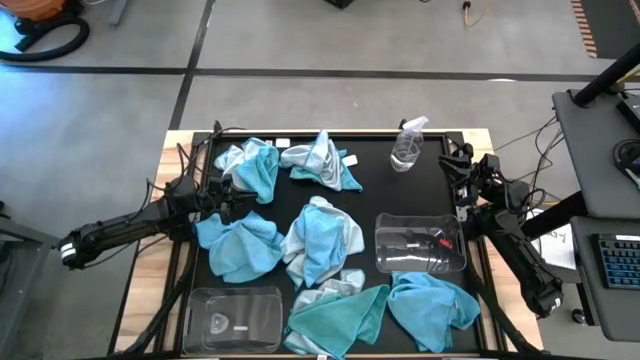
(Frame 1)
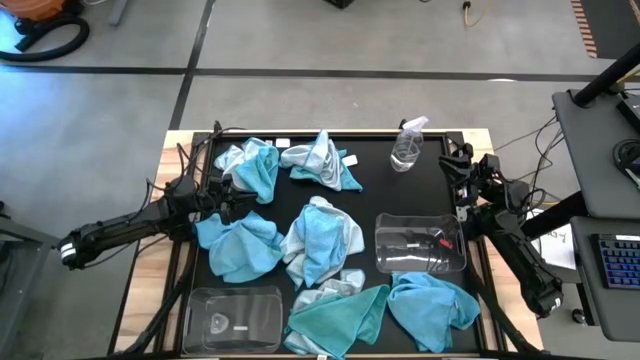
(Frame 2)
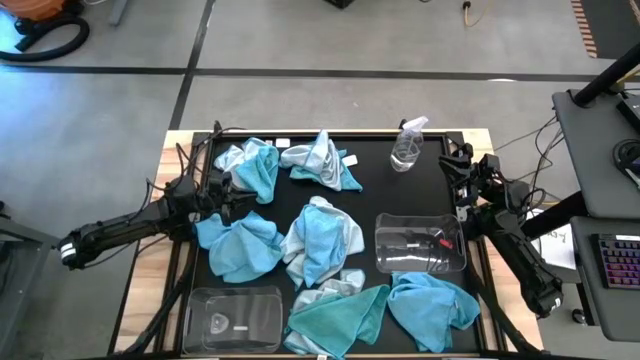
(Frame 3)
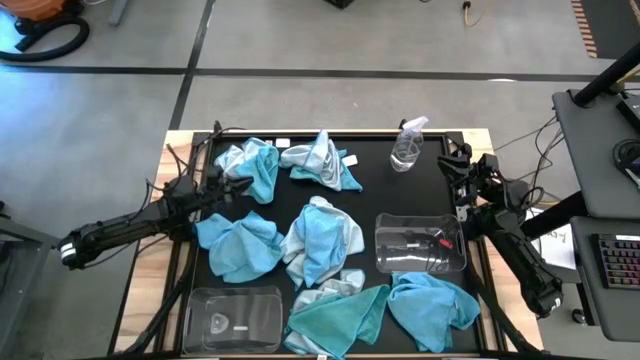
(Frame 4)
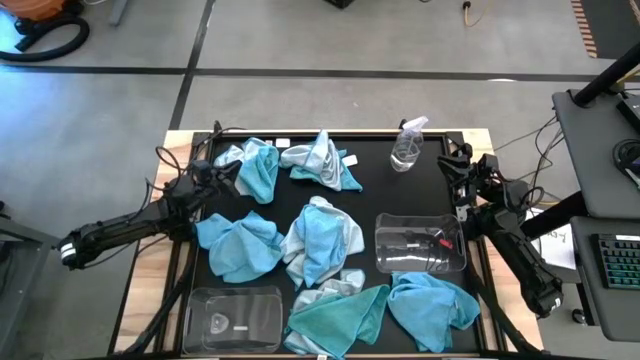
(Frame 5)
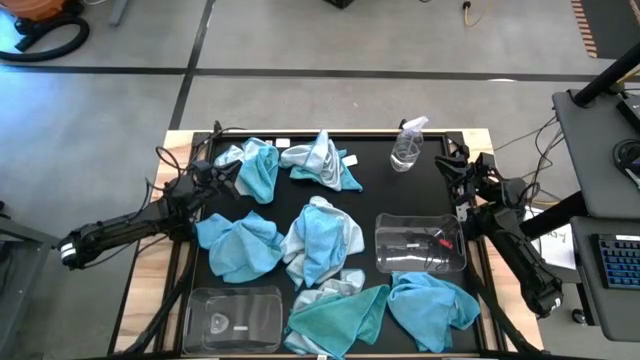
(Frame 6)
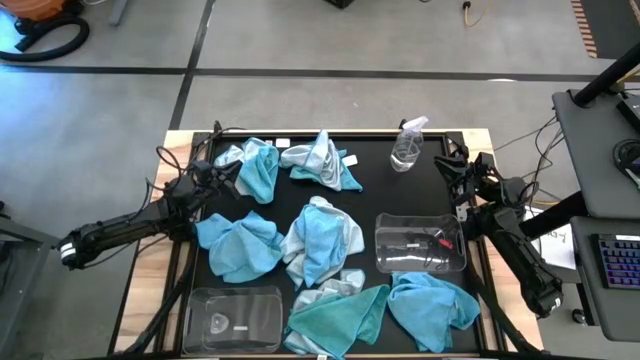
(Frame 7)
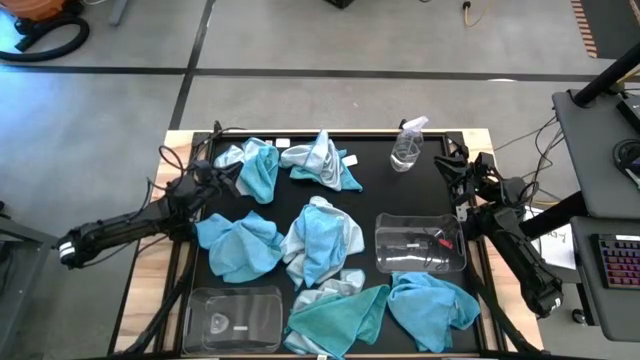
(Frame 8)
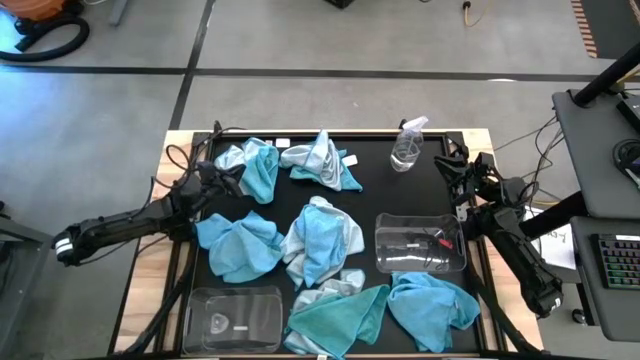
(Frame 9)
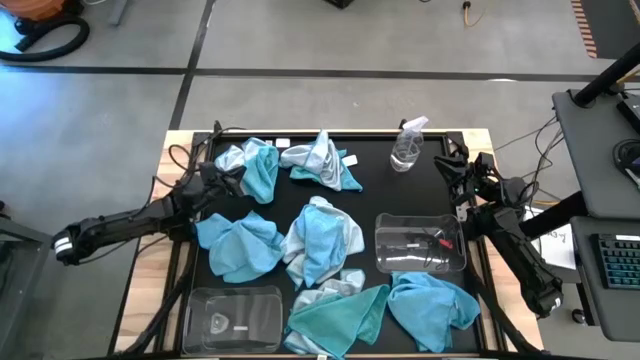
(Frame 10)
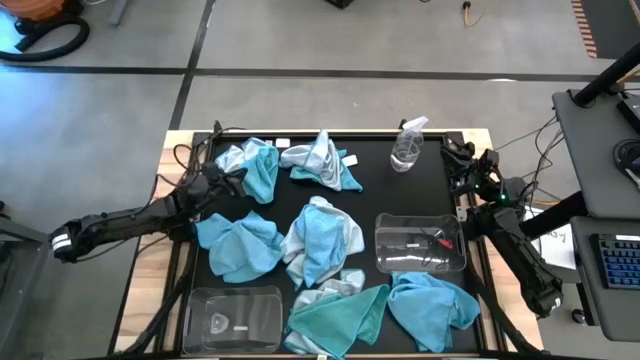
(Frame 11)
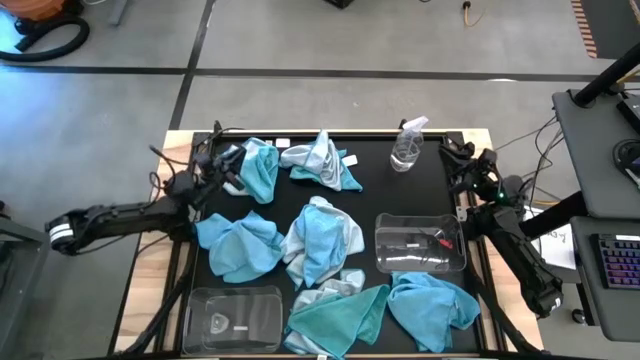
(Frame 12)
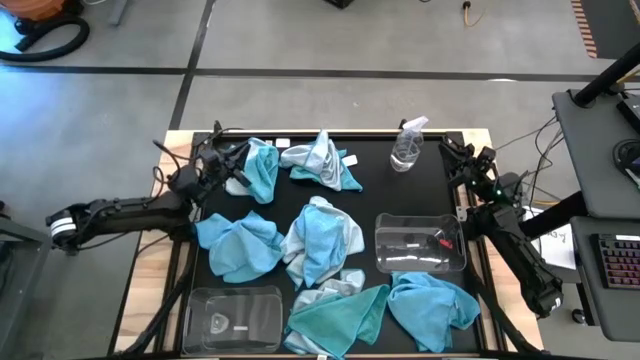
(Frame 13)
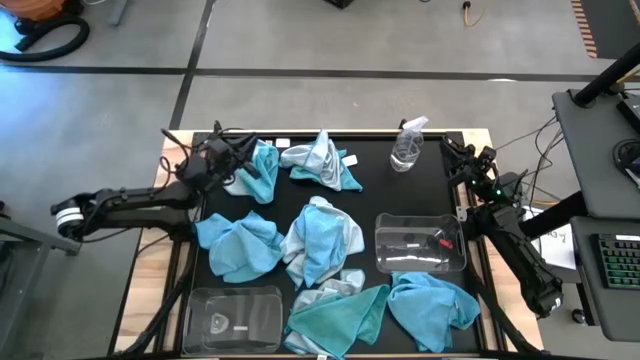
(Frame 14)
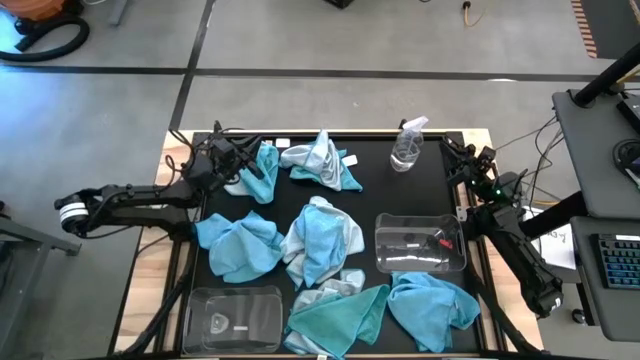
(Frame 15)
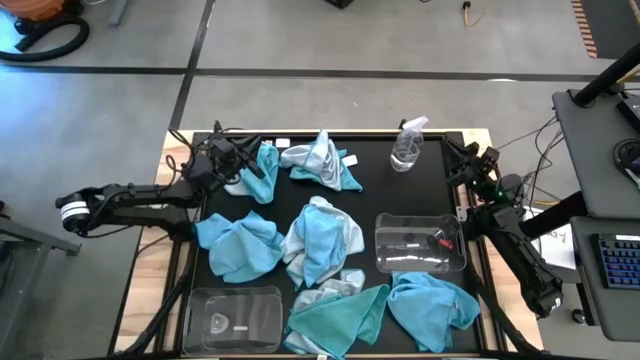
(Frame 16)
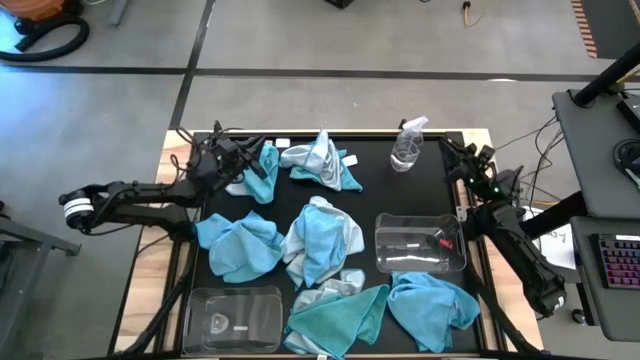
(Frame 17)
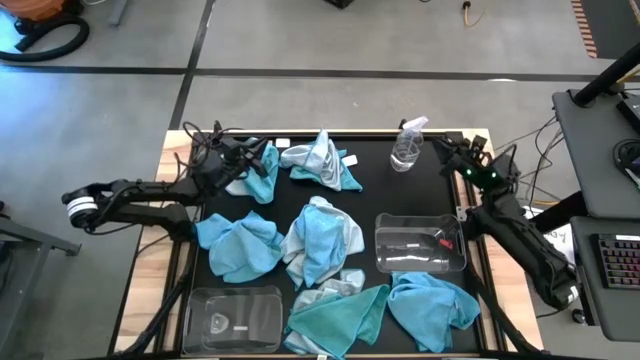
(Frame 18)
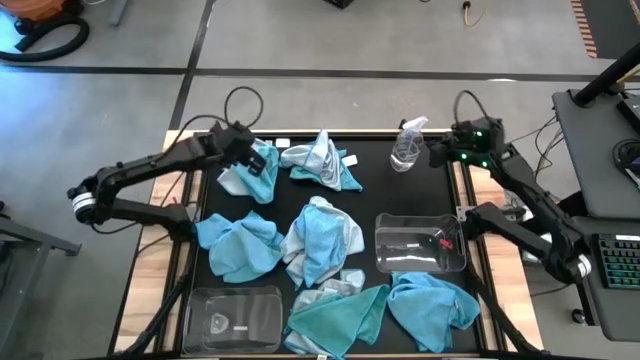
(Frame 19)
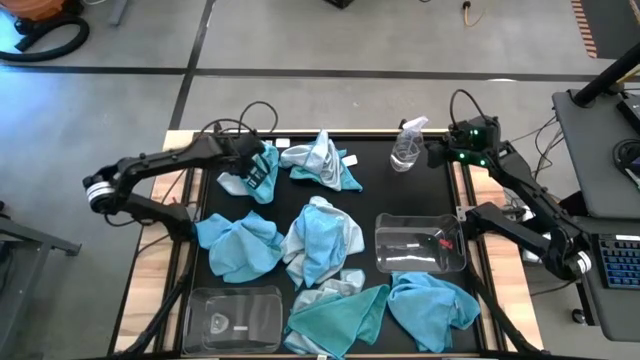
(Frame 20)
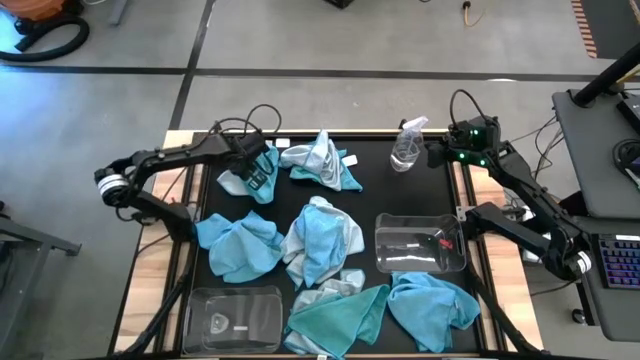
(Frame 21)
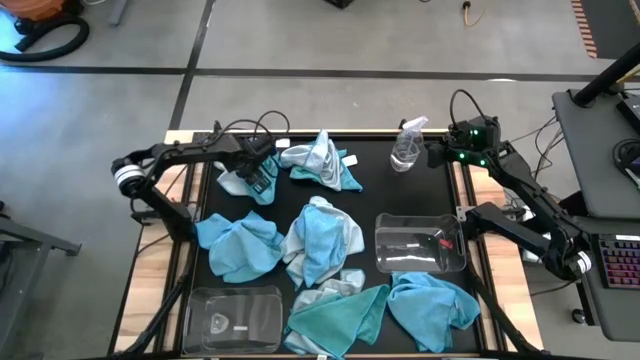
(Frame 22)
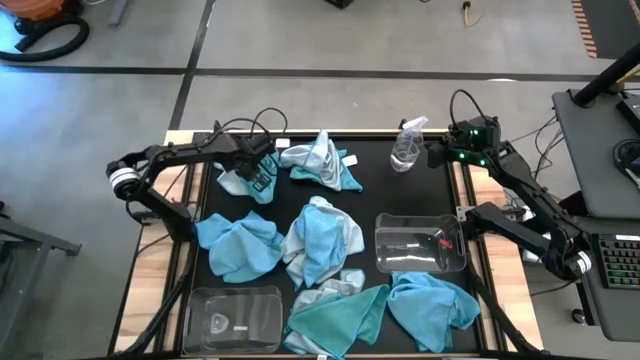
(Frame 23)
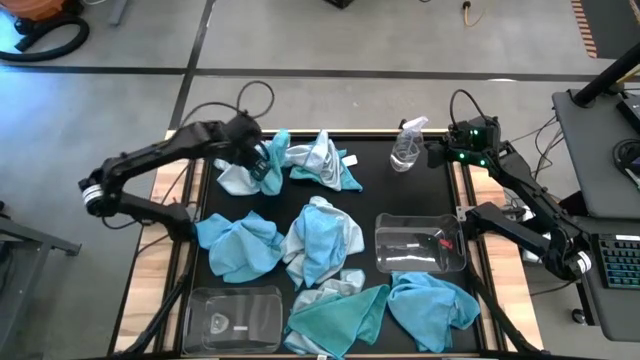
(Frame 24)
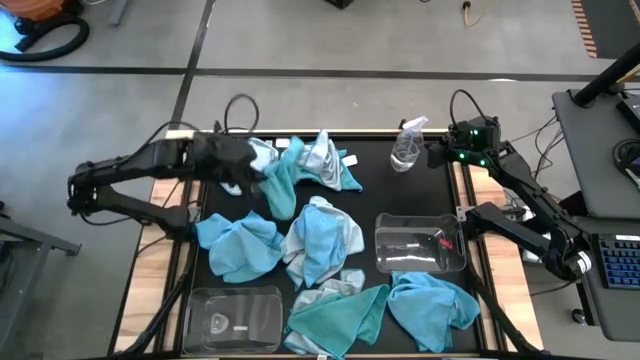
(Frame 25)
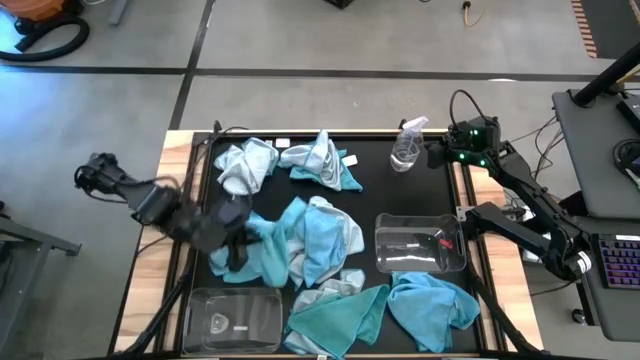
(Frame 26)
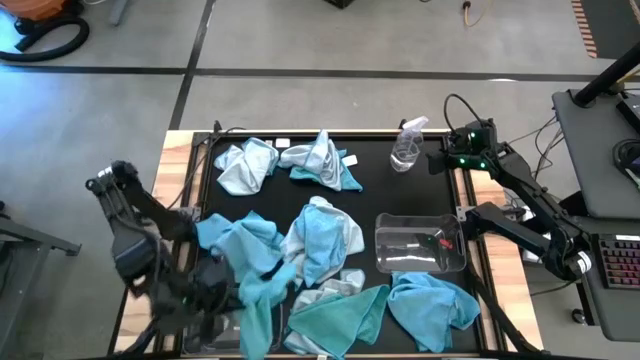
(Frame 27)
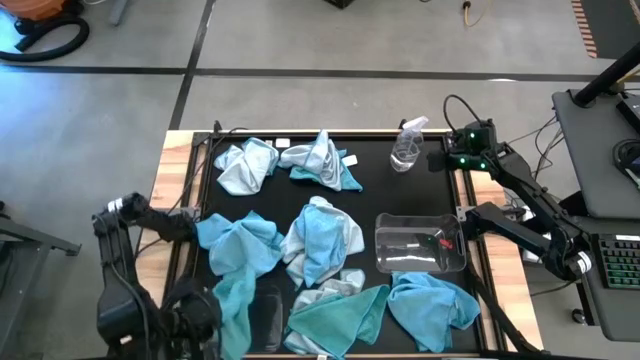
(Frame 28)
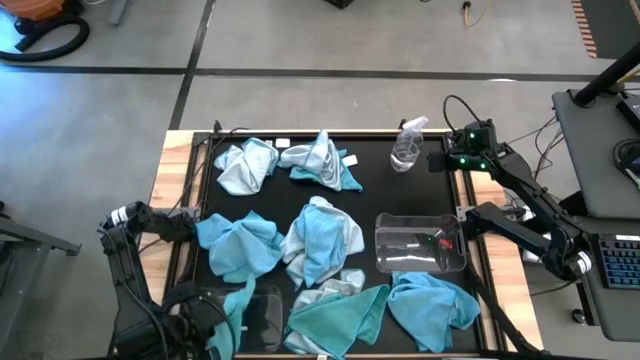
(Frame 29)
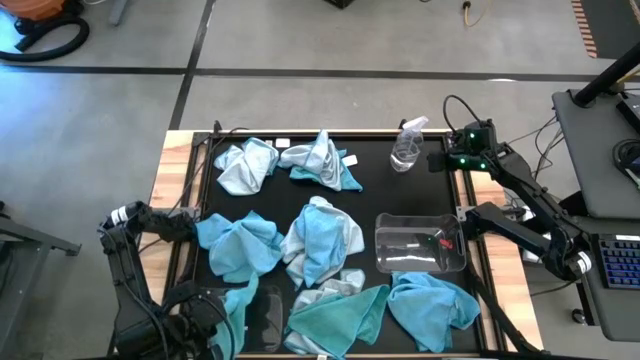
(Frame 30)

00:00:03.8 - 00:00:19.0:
Task: Sort microfiber towel by color & place in baskets
Put the blue towel into the bottom transparent bin

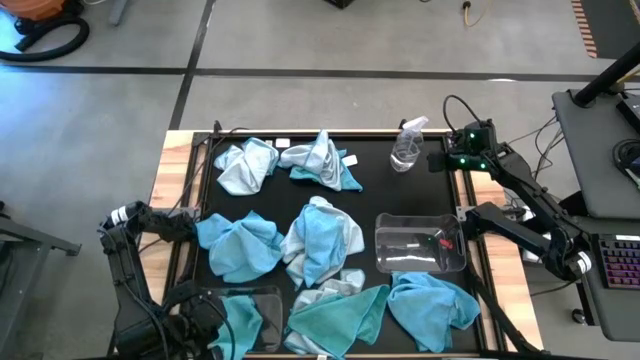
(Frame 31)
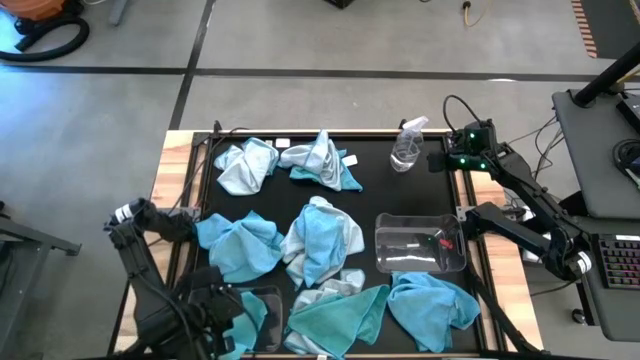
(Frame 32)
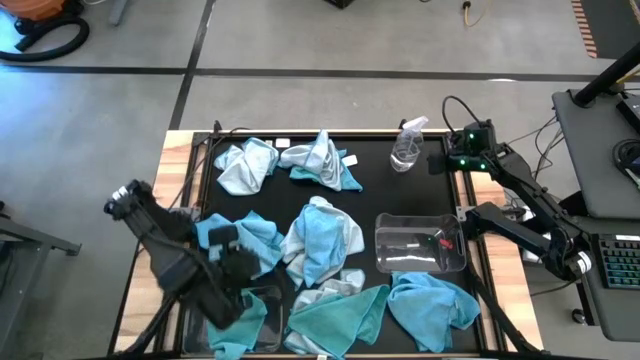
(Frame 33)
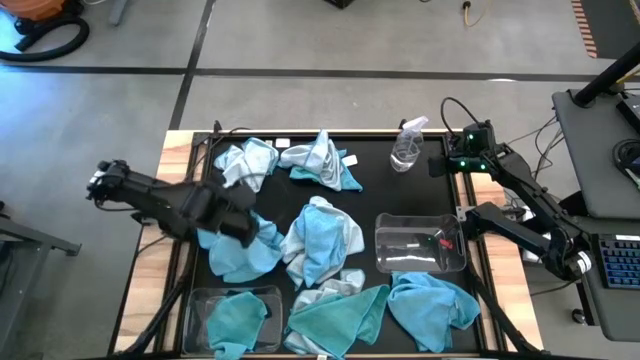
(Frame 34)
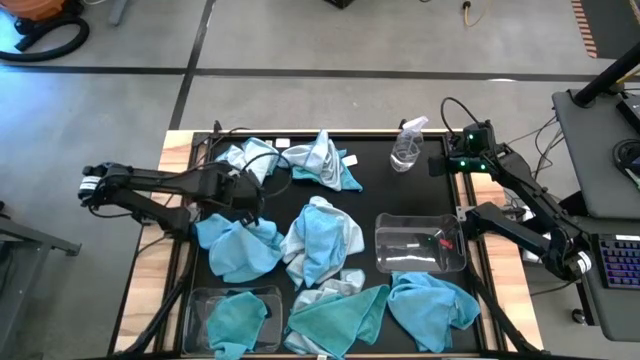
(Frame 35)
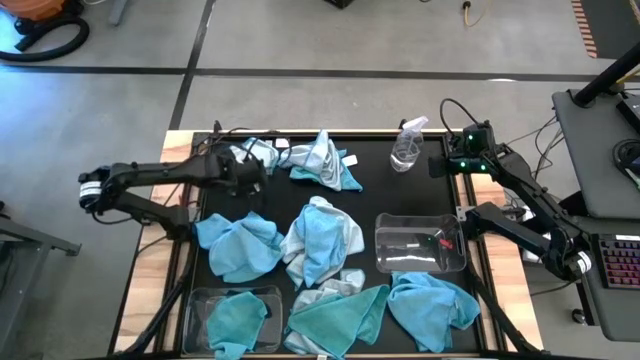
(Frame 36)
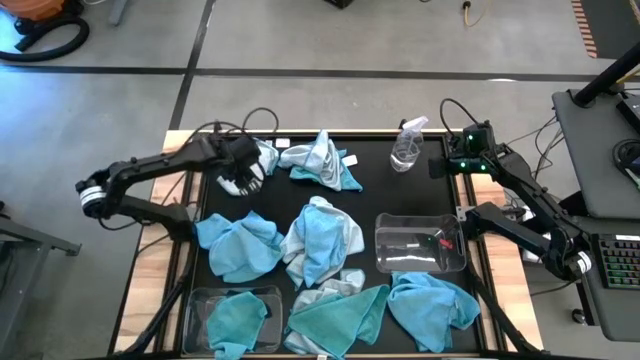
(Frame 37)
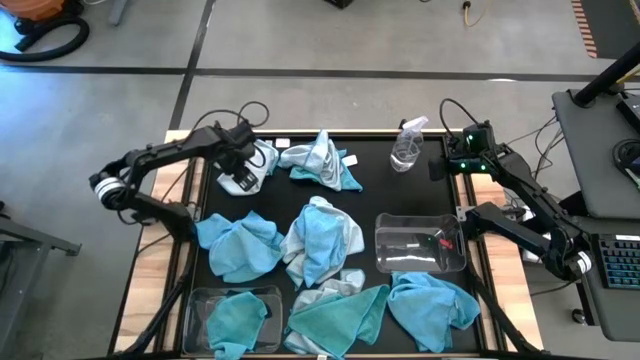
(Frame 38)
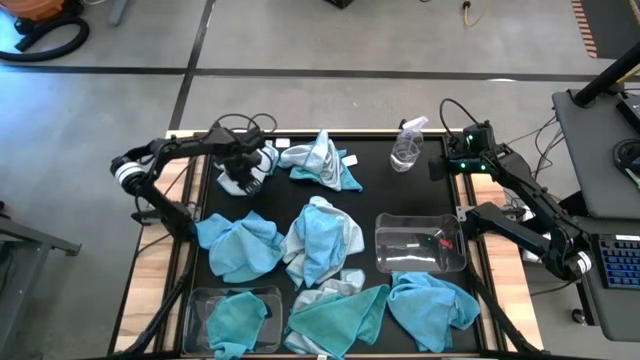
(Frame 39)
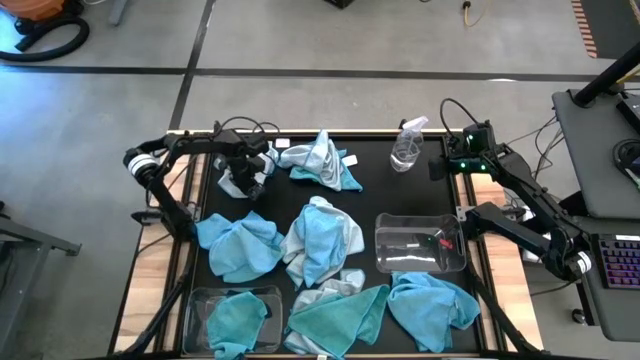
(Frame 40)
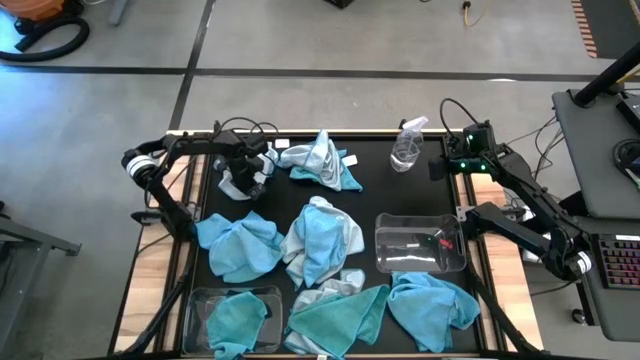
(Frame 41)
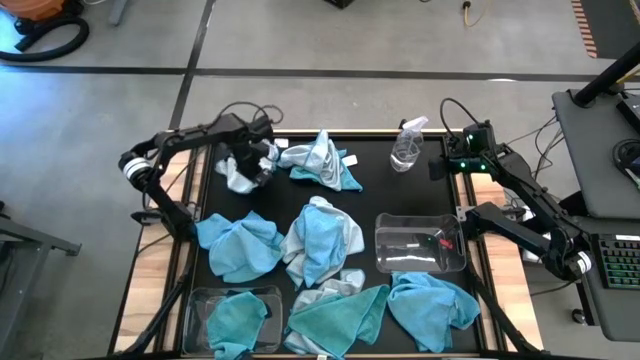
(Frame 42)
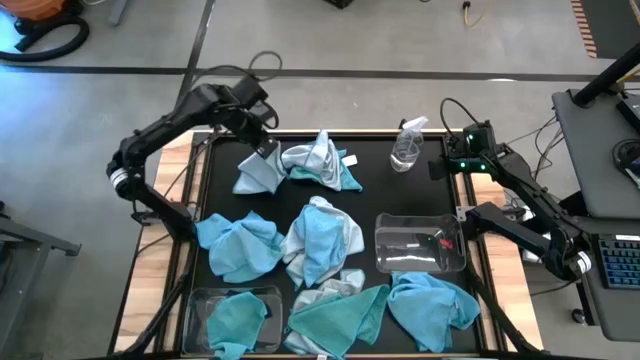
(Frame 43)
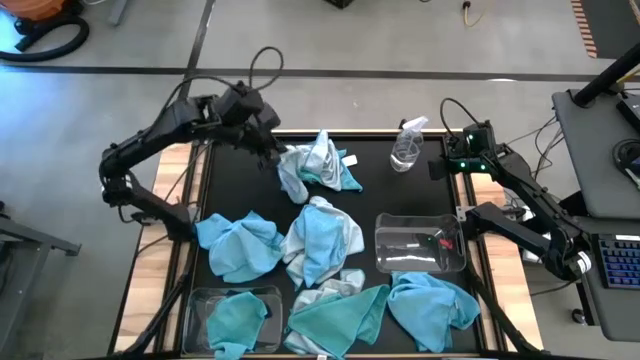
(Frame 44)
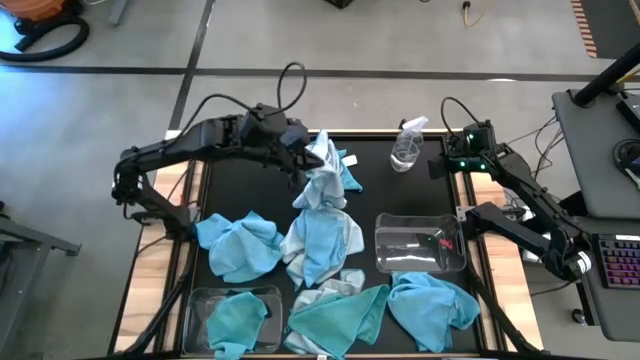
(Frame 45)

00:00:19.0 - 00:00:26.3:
Put the white towel into the top transparent bin
